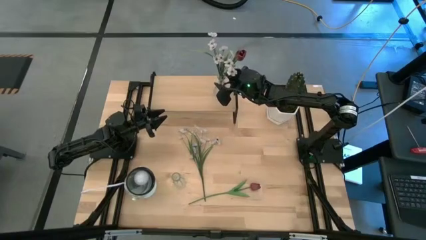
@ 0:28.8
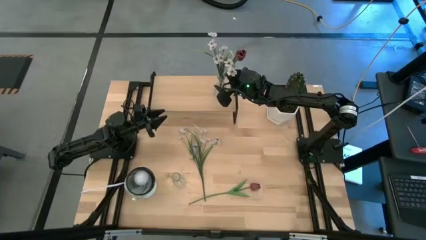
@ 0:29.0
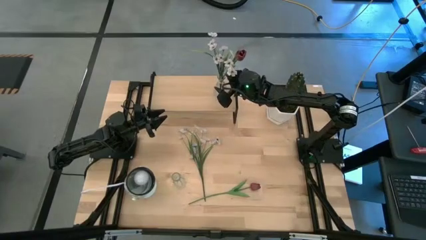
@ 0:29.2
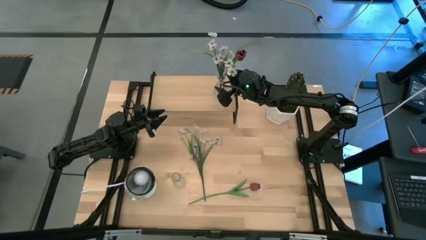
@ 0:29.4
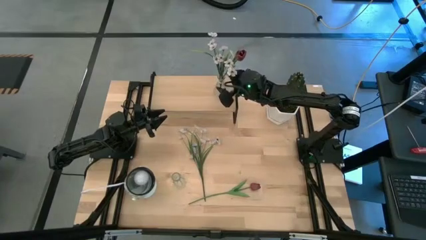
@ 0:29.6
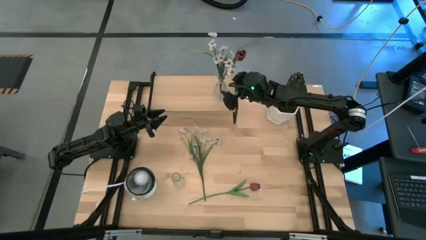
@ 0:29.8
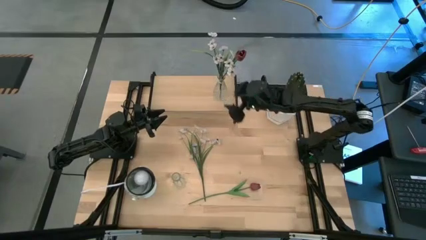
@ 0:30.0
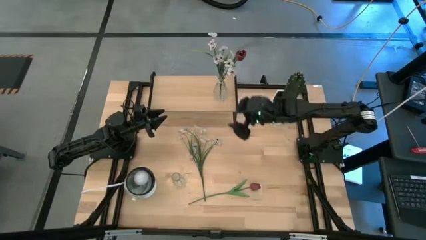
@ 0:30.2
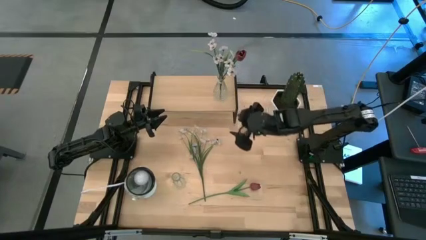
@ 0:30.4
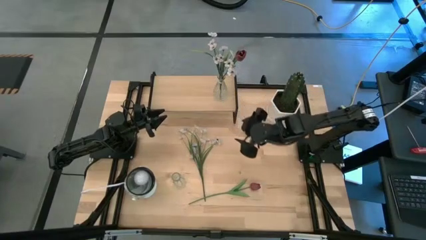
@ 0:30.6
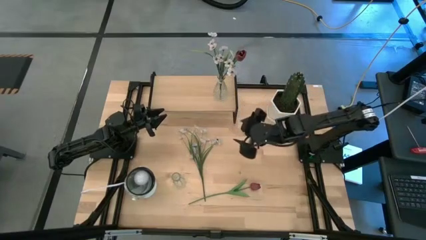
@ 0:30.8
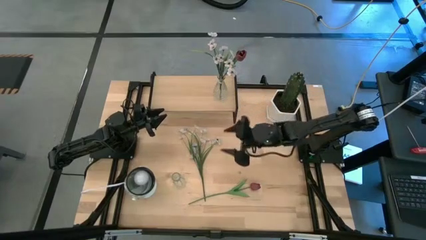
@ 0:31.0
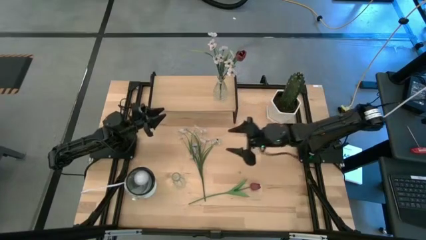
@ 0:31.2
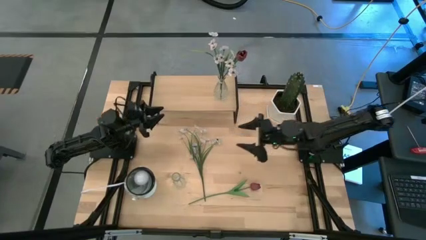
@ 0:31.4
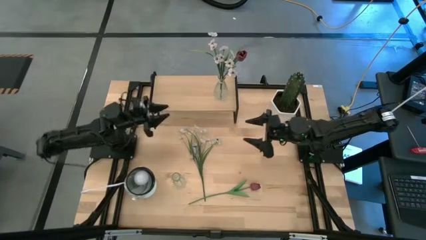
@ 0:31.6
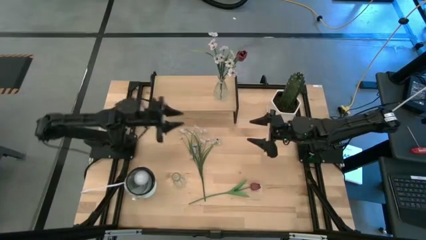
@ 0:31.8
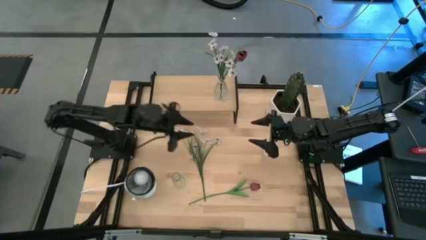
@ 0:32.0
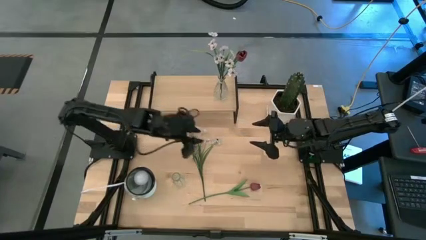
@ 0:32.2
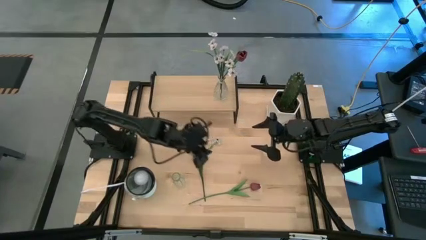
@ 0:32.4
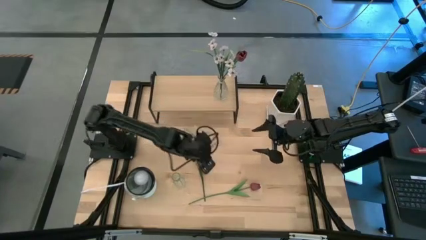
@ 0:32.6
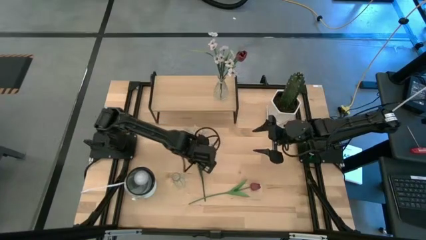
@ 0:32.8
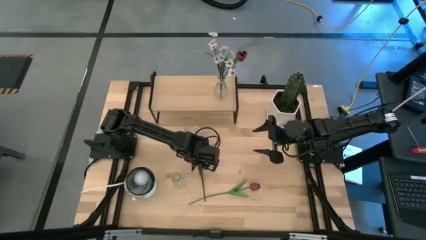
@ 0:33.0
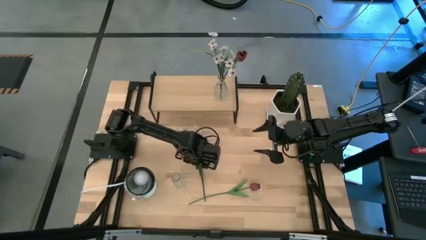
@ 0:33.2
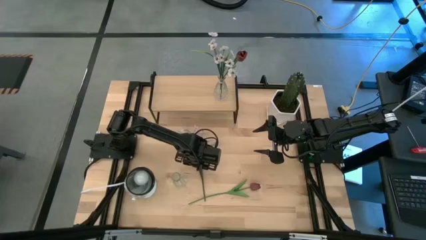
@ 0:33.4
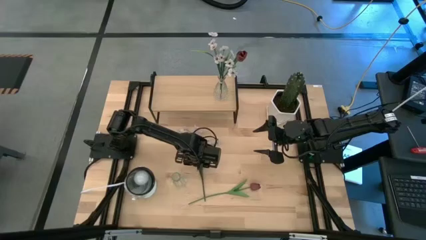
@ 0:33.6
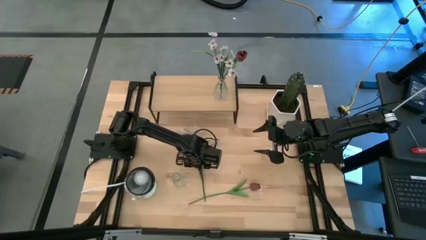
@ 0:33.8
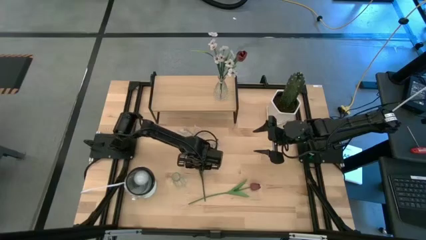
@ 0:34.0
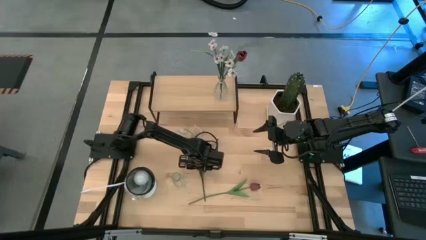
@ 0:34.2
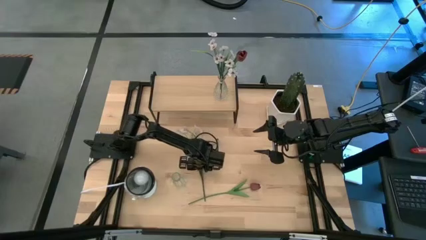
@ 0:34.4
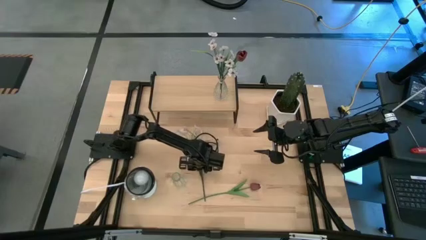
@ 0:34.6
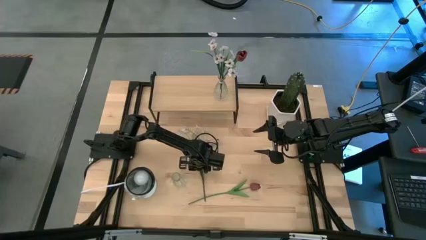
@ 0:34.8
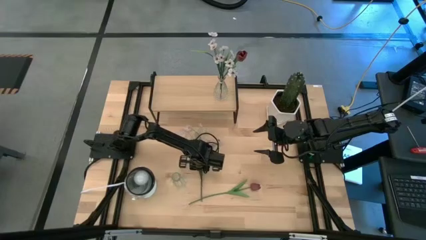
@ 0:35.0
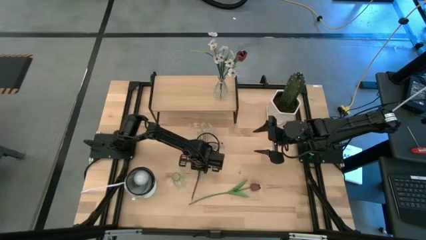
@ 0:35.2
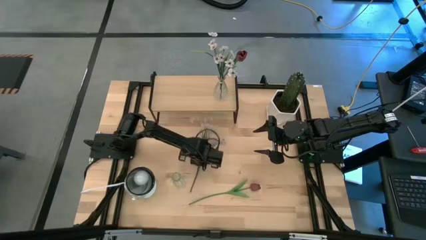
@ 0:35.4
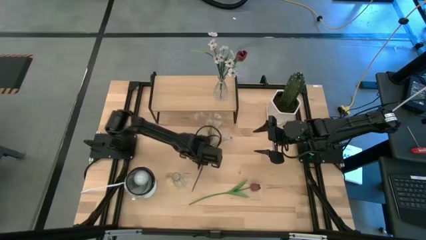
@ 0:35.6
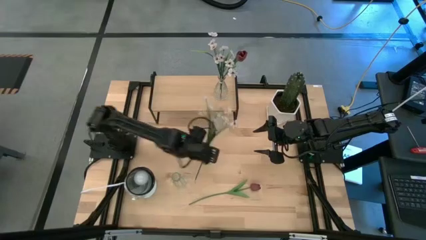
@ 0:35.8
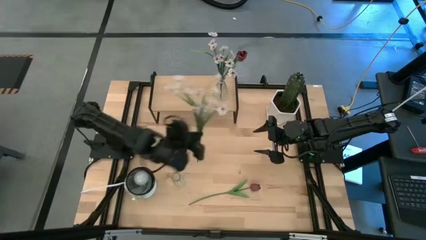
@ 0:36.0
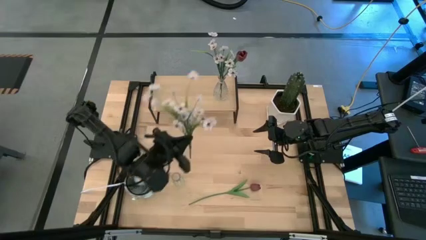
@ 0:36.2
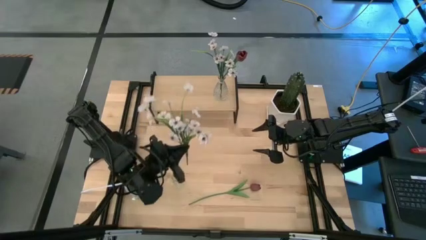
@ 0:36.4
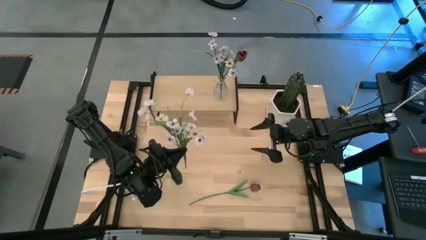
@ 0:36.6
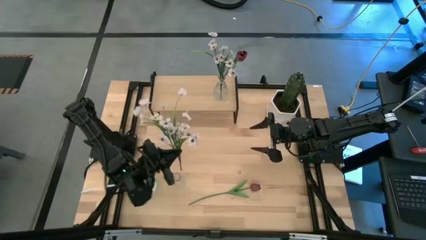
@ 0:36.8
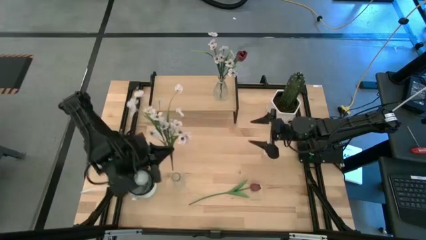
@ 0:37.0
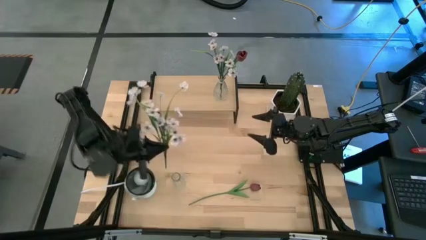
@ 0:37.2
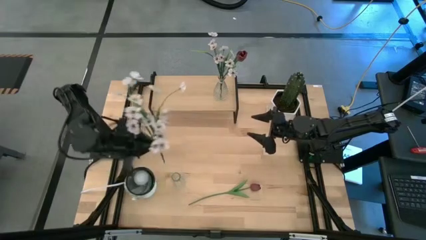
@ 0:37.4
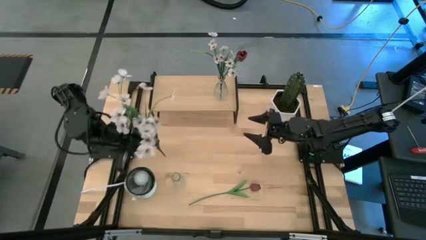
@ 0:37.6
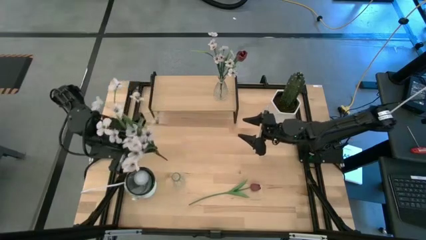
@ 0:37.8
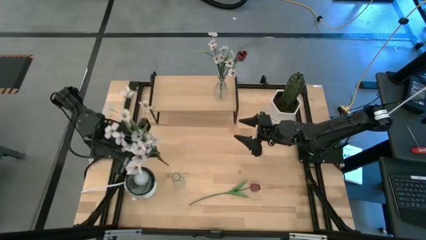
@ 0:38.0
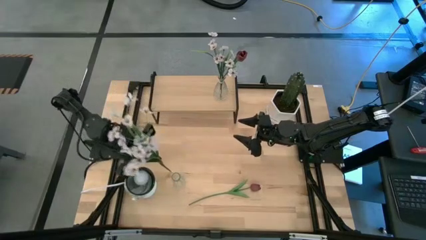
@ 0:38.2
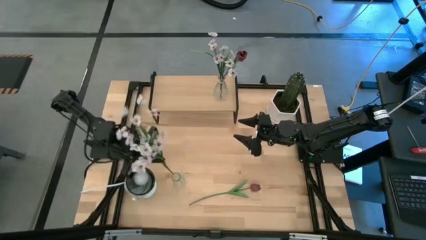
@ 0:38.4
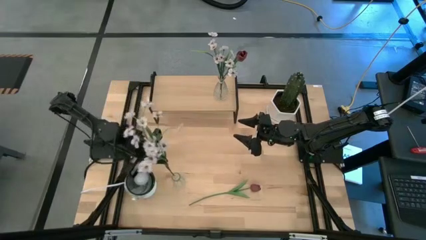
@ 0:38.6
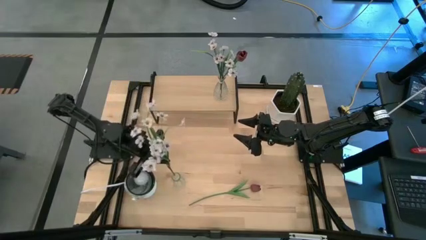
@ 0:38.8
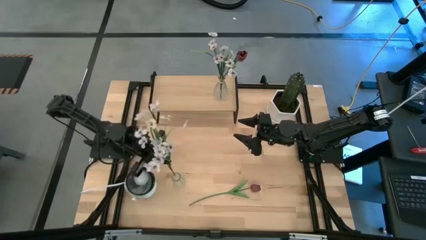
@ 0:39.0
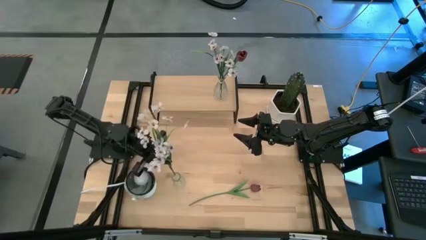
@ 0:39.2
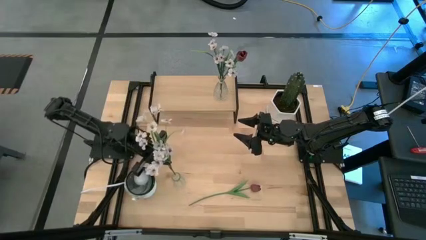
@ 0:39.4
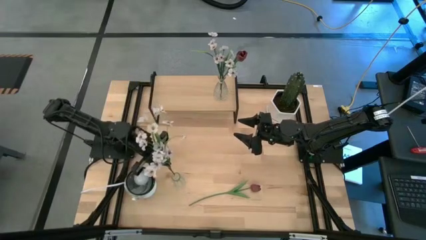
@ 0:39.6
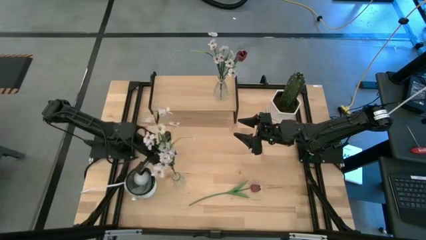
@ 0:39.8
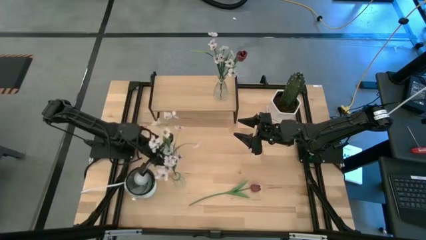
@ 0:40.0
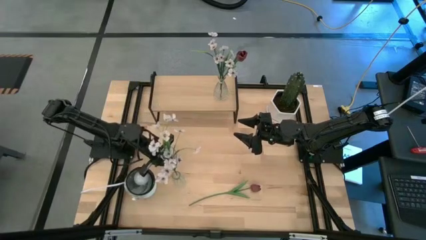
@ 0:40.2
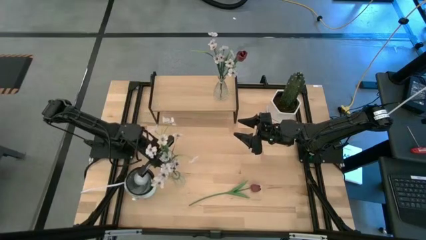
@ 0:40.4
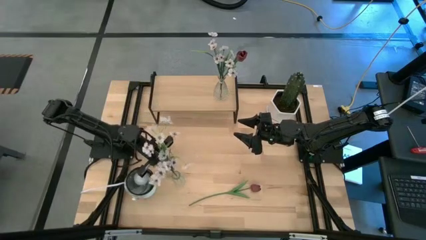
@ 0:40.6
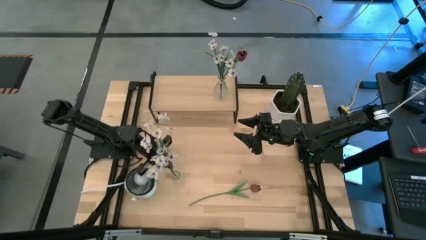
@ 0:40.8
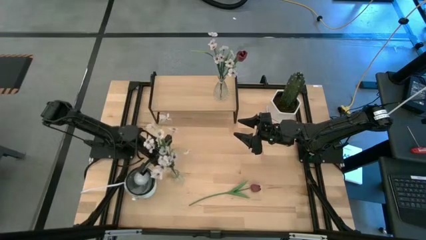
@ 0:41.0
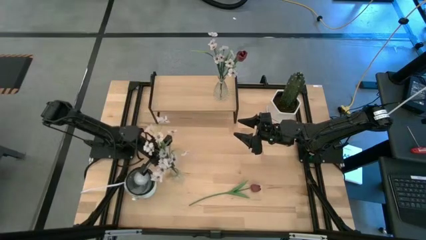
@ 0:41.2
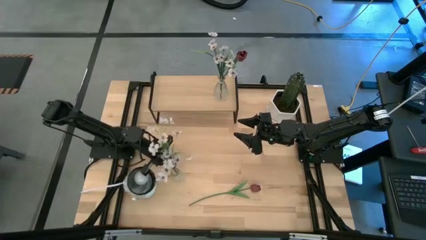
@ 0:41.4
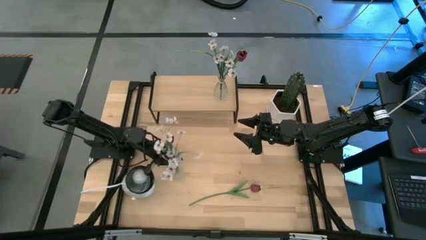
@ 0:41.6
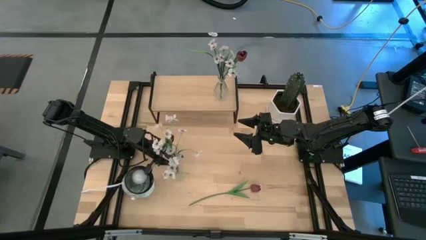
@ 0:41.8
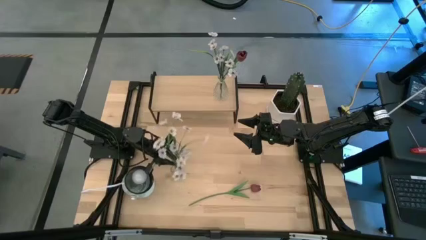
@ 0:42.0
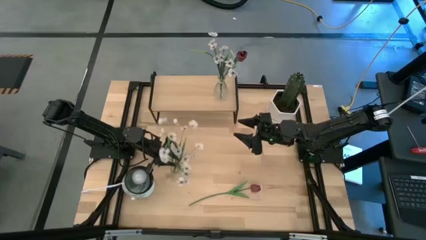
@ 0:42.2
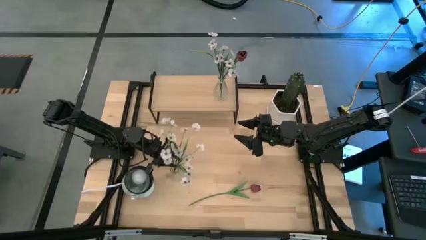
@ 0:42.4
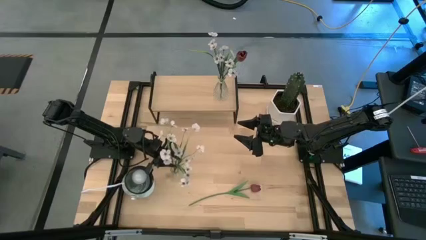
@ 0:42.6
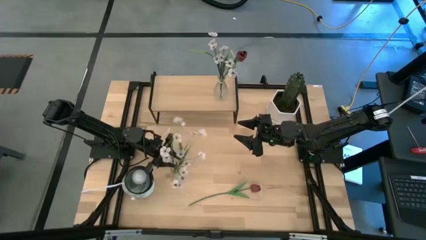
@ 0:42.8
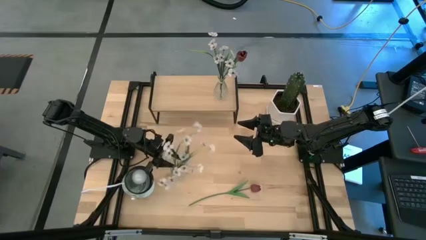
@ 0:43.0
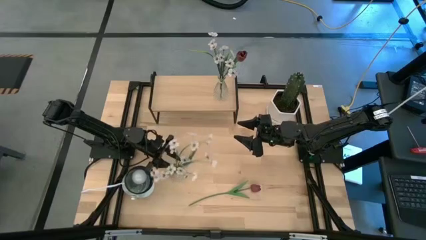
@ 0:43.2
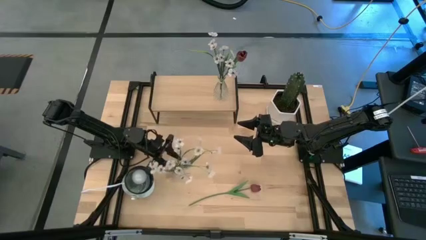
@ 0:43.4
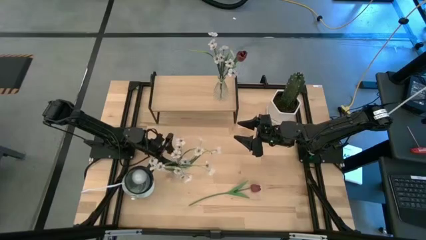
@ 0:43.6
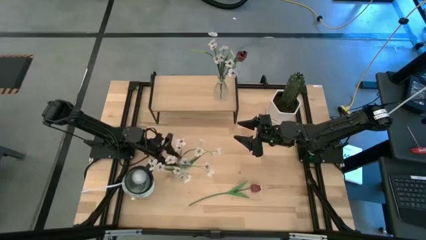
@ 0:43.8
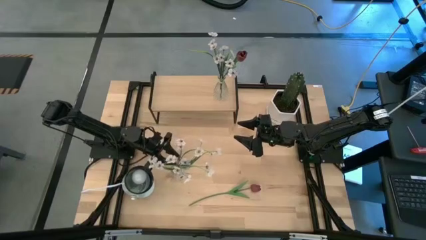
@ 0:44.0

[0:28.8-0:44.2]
Task: Pick and place flowers into a vace then onto a shelf
Put the white flowers into the transparent vase
